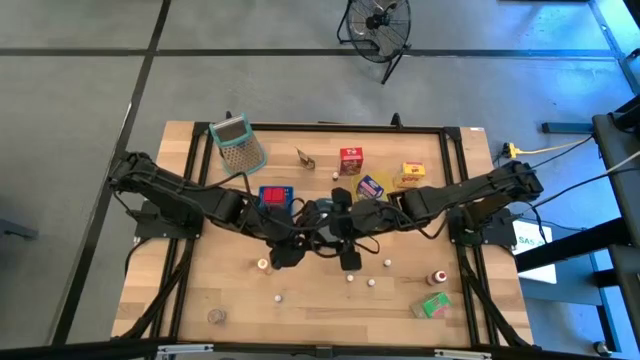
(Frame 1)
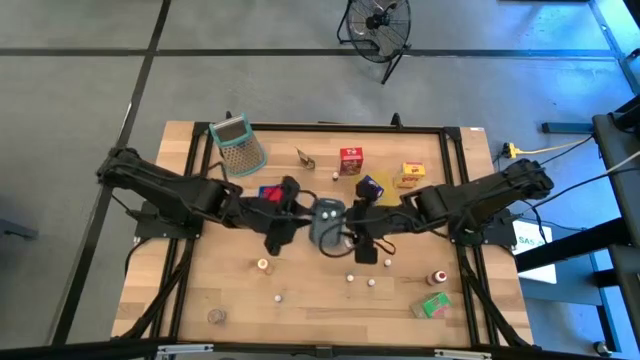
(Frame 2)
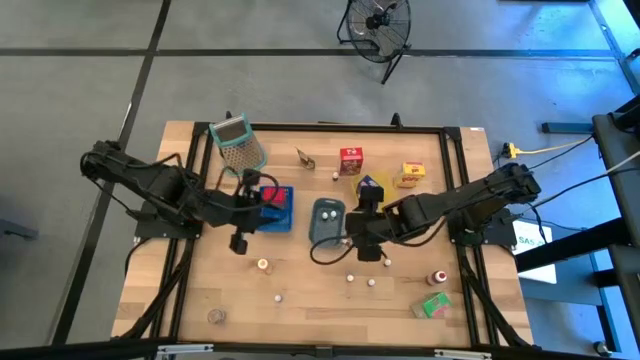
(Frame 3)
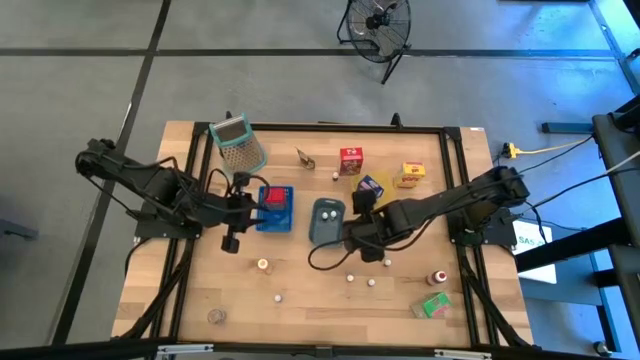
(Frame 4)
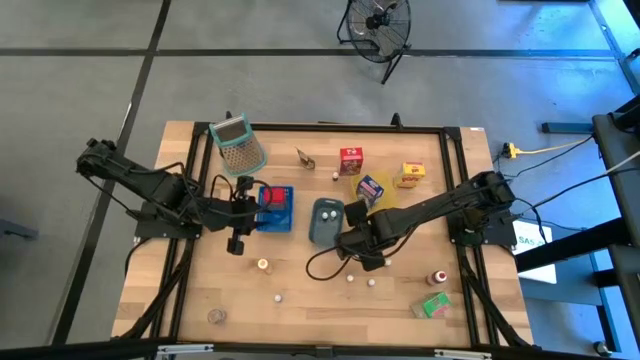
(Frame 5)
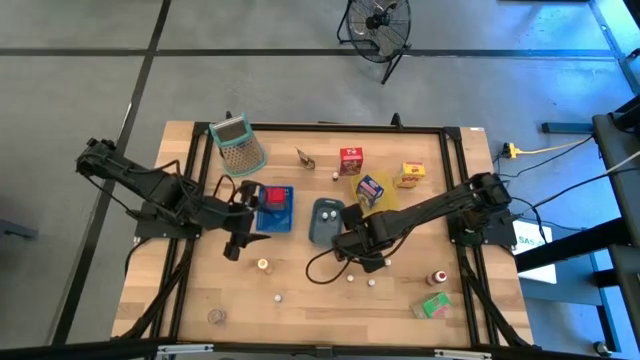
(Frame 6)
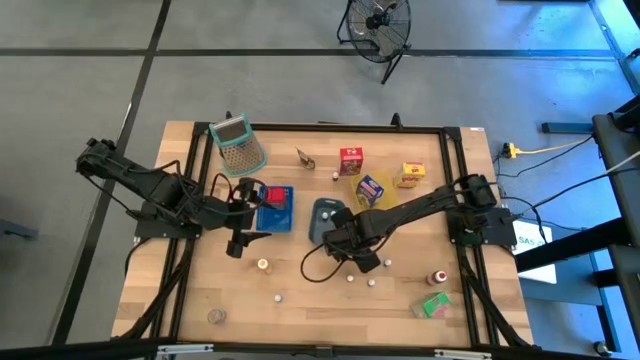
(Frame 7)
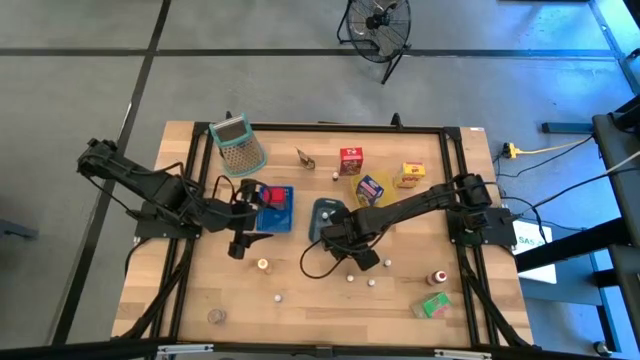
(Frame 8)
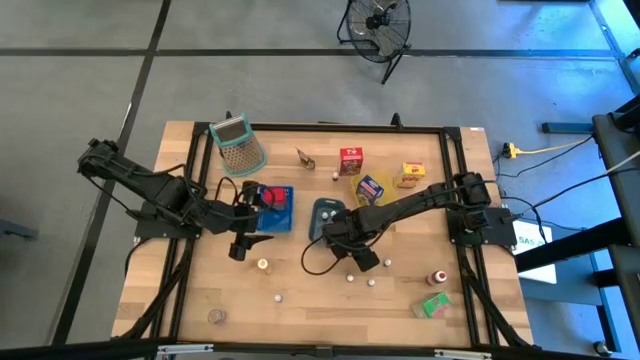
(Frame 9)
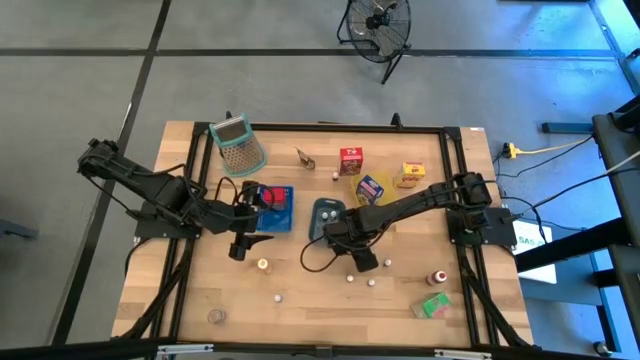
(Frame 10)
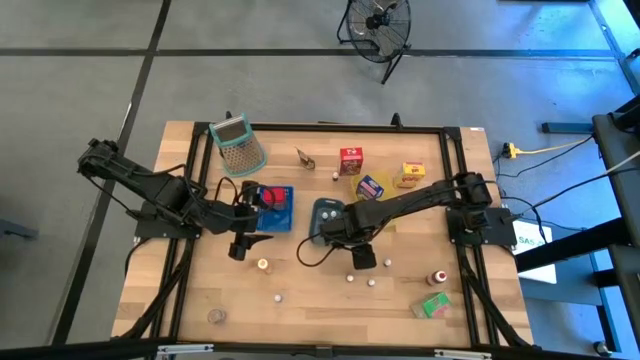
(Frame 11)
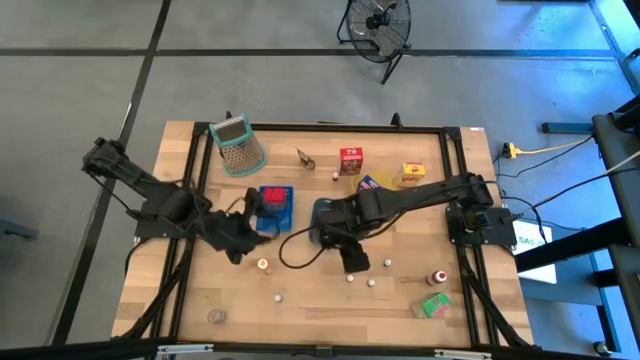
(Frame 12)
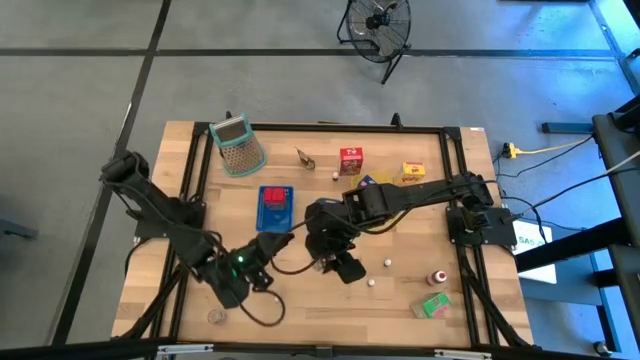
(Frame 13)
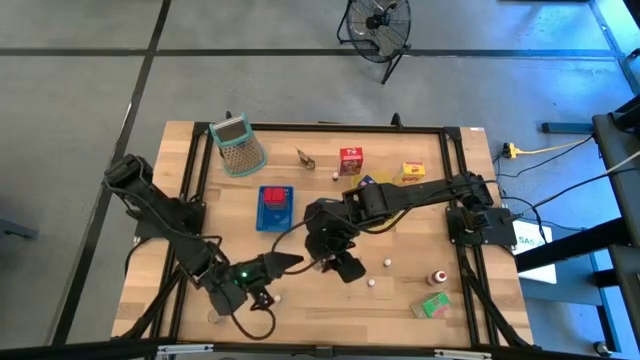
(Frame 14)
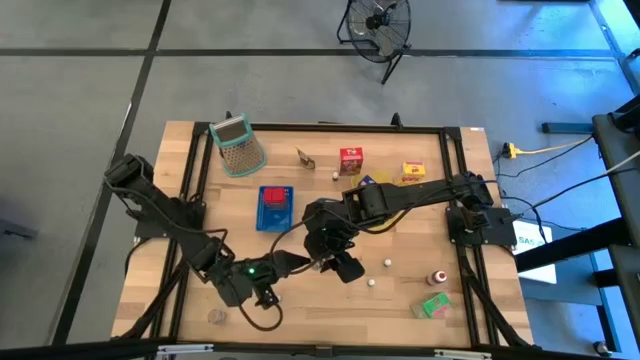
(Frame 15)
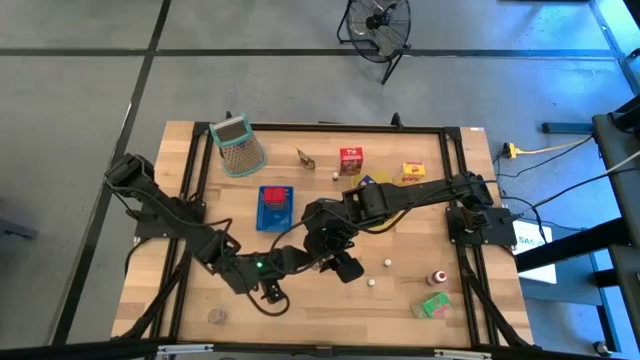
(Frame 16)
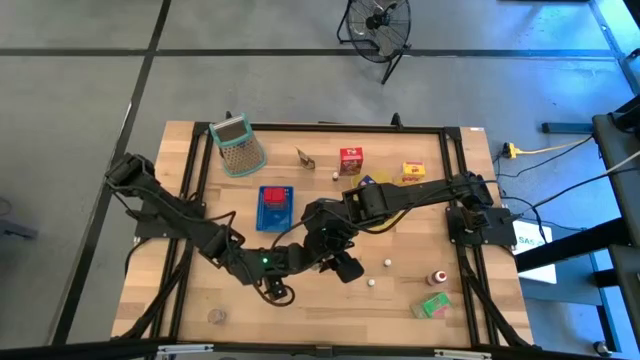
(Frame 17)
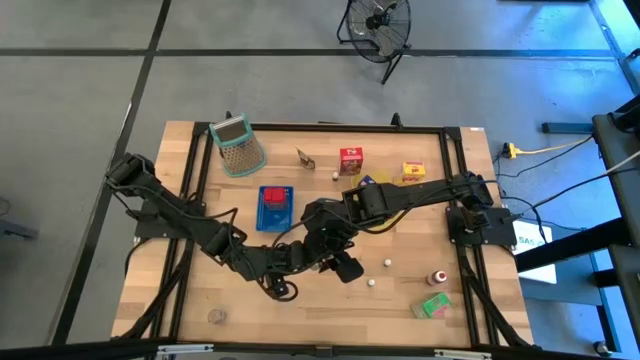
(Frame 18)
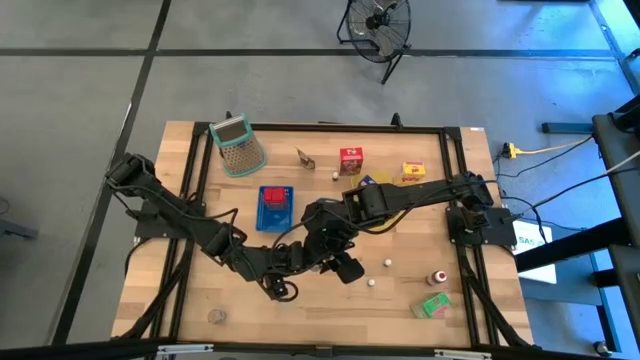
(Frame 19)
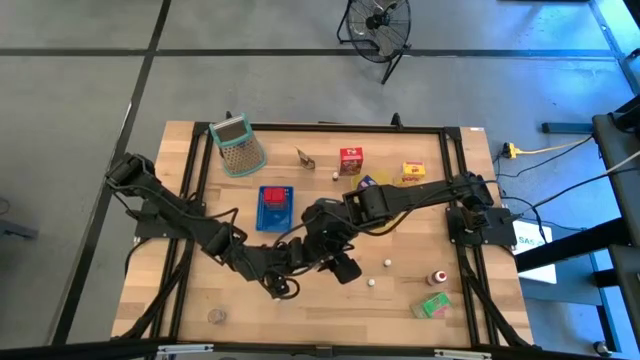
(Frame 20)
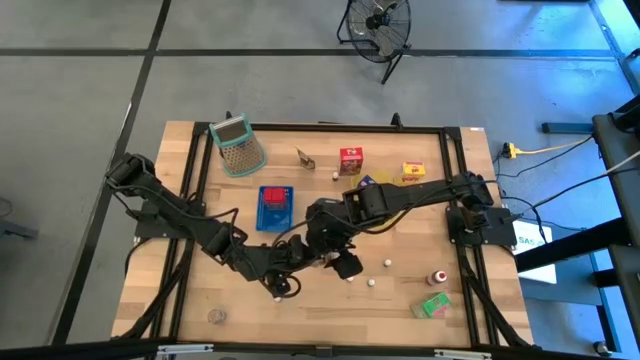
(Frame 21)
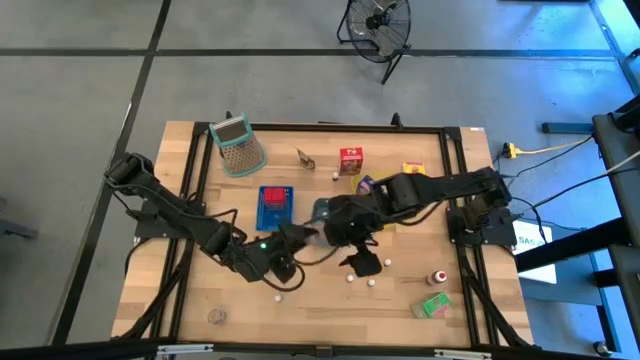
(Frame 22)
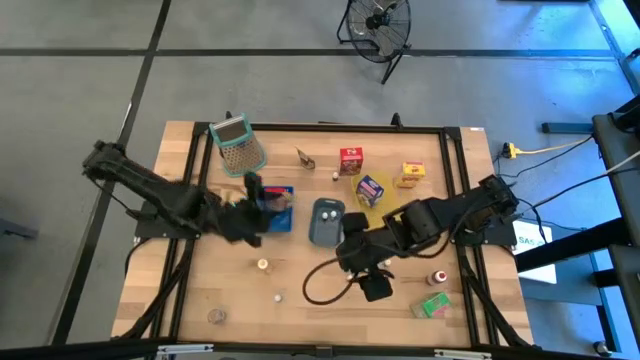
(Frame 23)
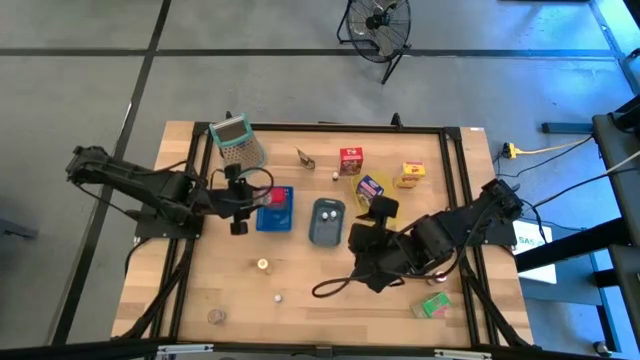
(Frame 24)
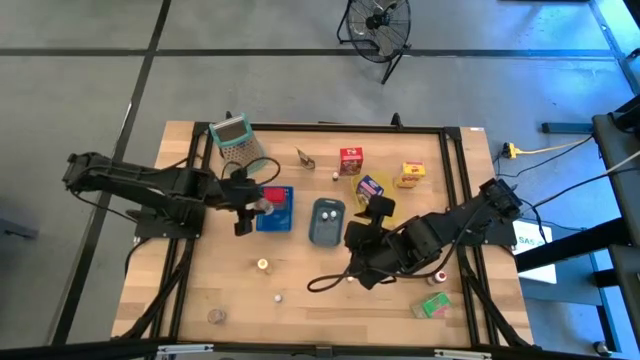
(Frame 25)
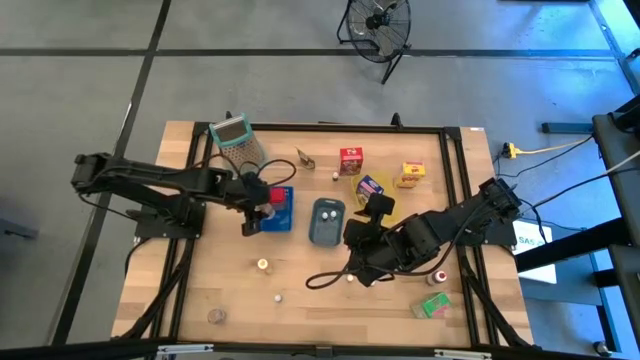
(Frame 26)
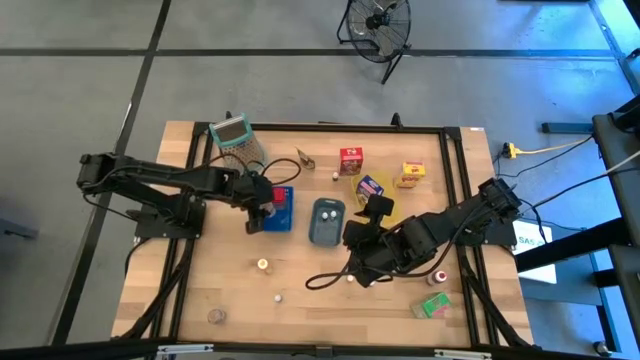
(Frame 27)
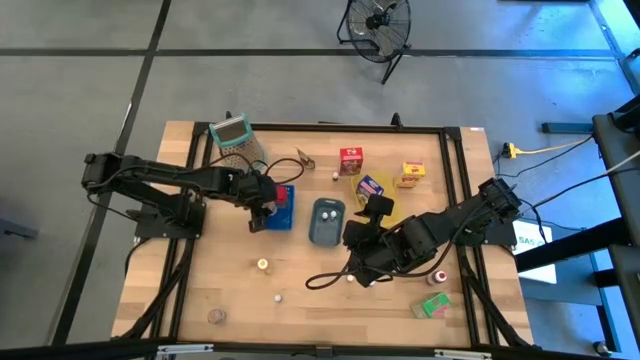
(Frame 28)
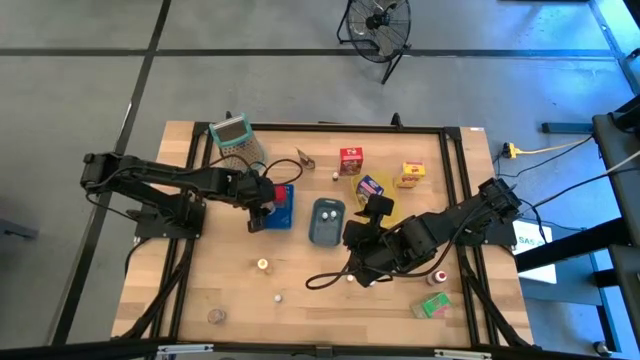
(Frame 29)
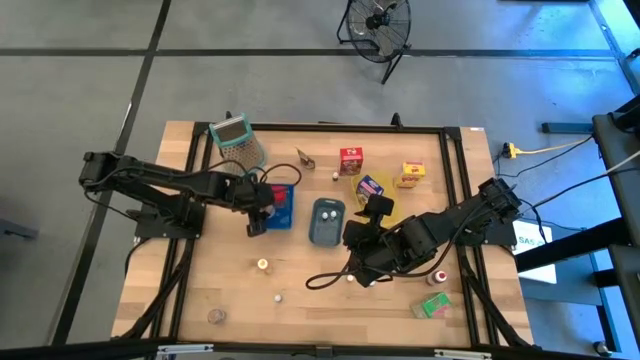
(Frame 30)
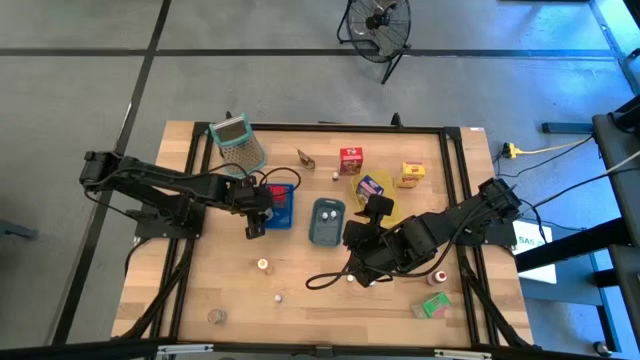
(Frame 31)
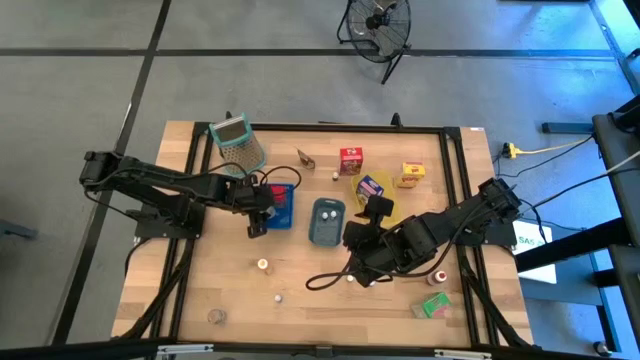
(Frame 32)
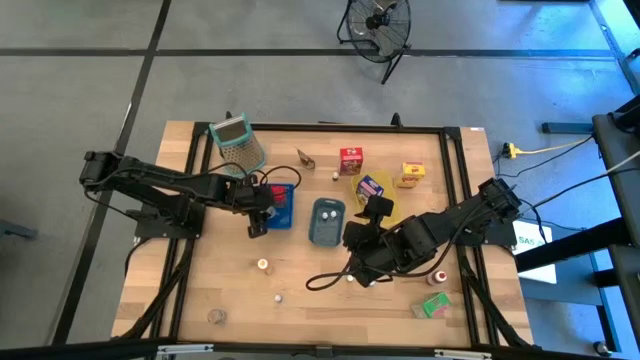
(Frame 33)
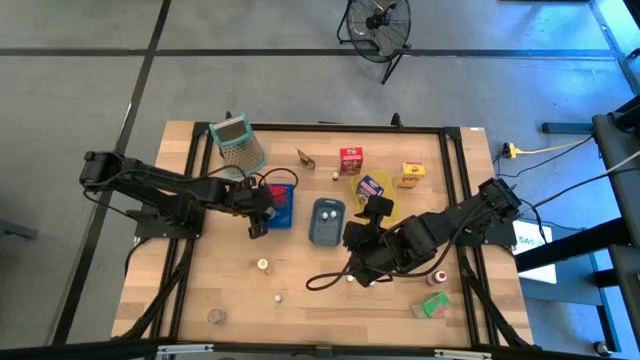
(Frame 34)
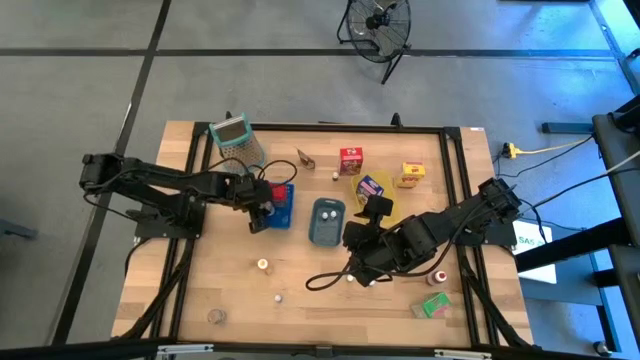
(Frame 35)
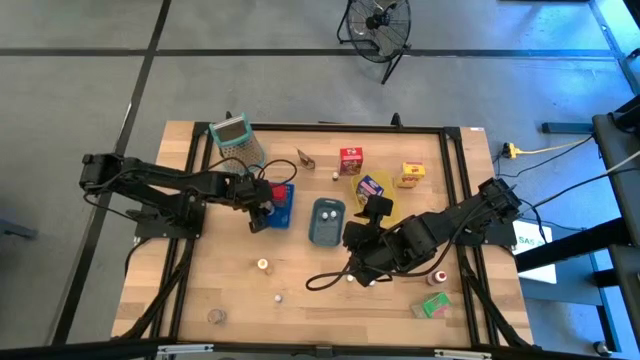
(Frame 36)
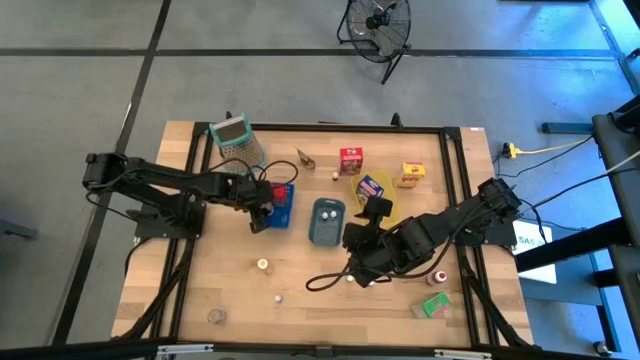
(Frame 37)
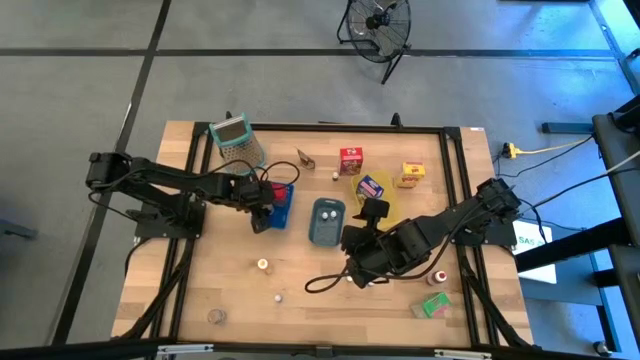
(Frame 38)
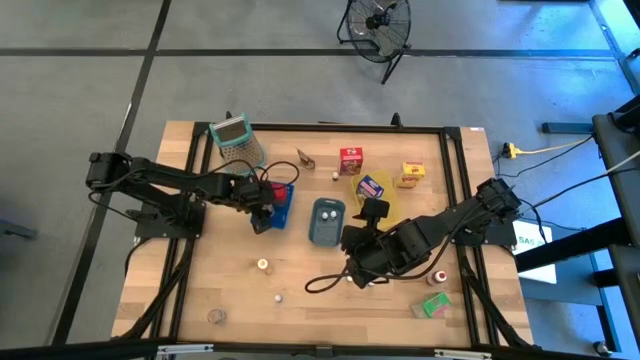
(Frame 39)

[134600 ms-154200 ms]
Task: Pick & Place Kitchen Items
Put the right brown seasoning bottle into the blue bin

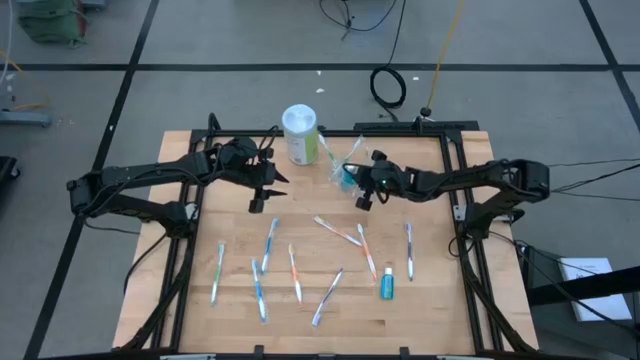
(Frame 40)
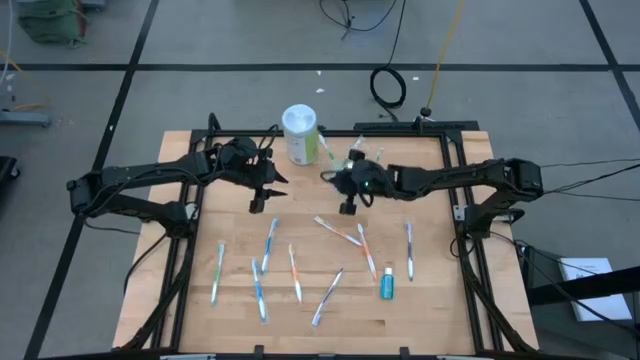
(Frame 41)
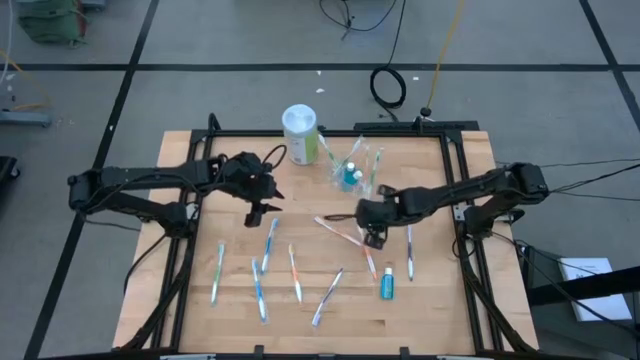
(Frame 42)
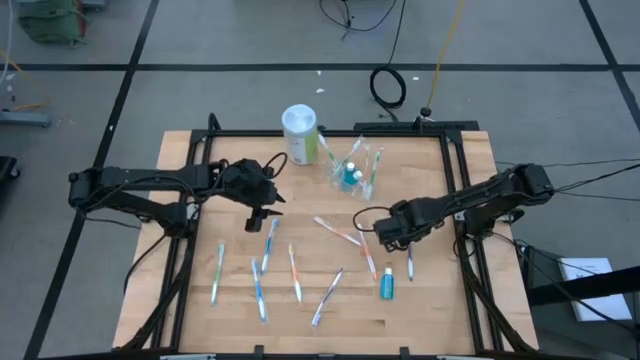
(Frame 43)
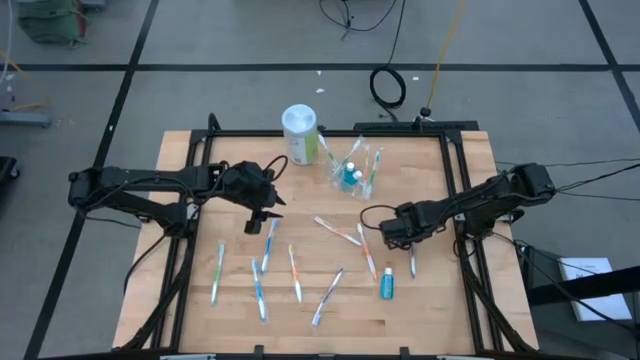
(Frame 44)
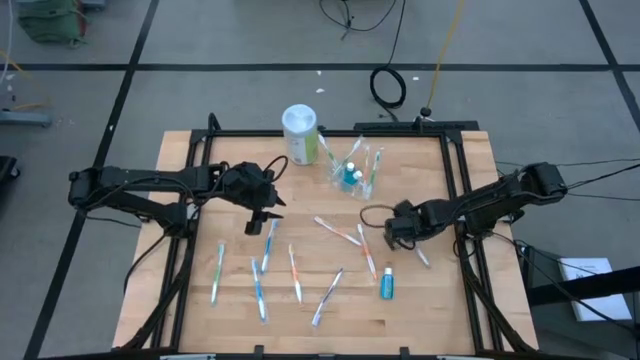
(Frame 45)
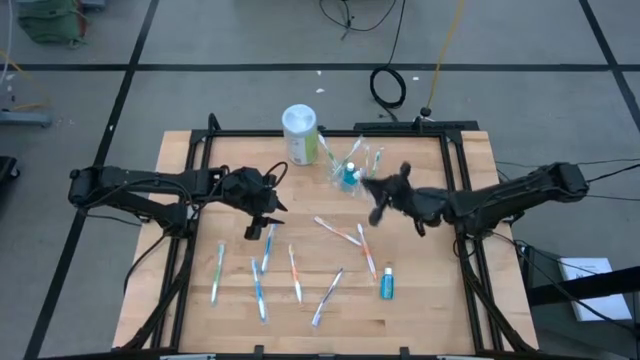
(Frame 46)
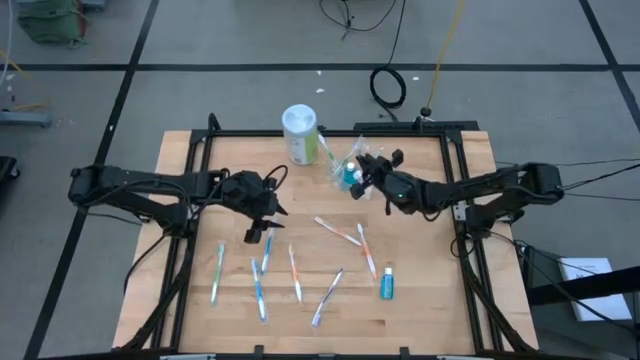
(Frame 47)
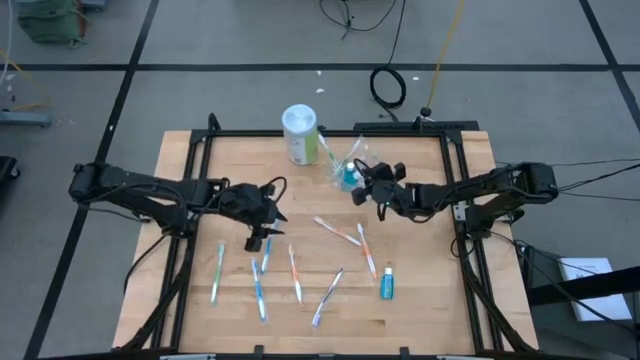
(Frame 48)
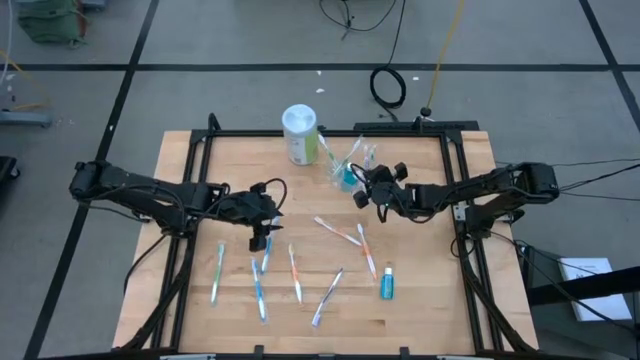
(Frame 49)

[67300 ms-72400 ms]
Task: Pick & Place toothbrushing station
Put the purple toothbrush into the transparent organizer
